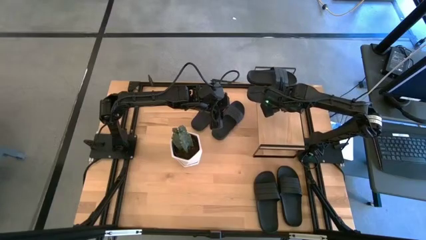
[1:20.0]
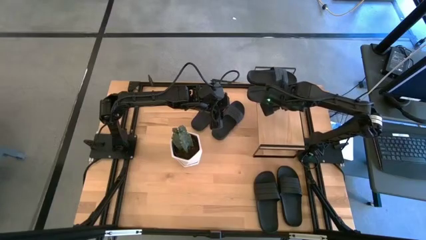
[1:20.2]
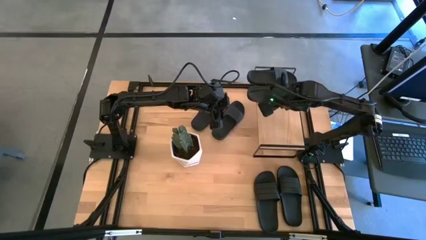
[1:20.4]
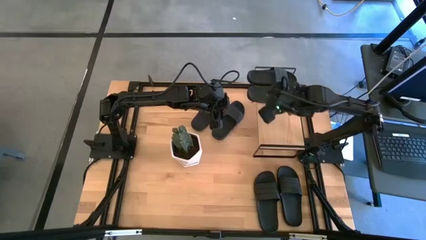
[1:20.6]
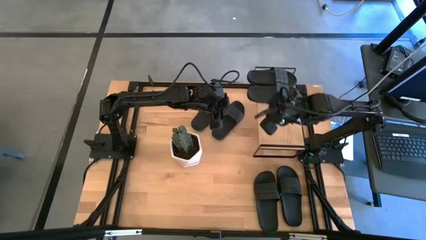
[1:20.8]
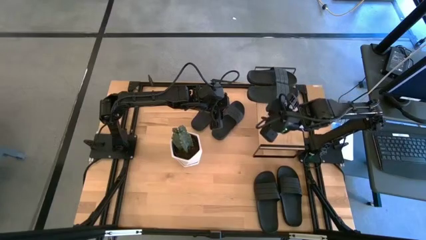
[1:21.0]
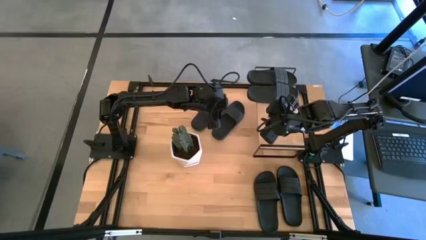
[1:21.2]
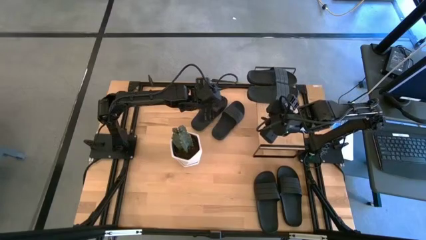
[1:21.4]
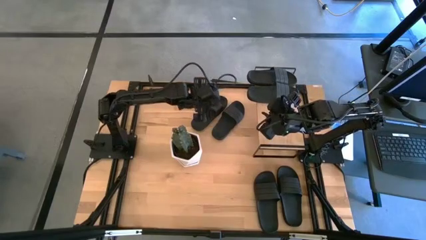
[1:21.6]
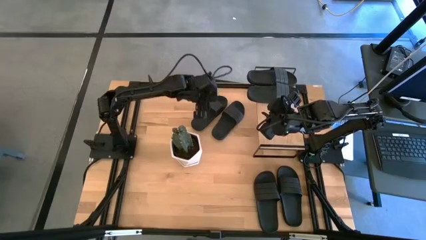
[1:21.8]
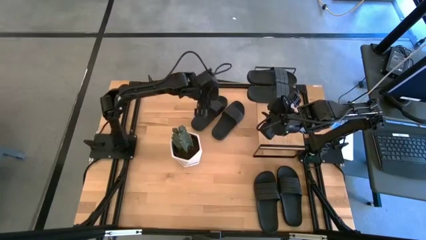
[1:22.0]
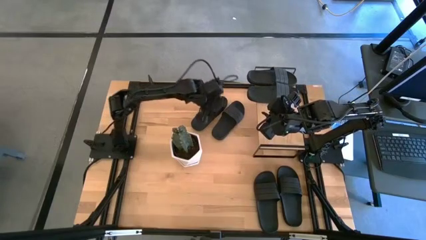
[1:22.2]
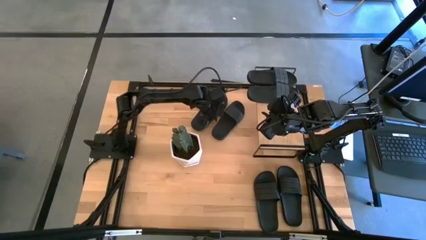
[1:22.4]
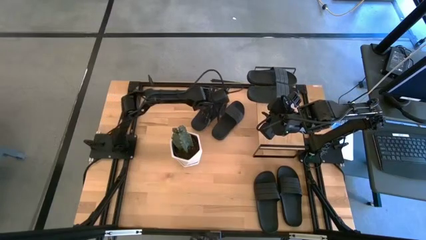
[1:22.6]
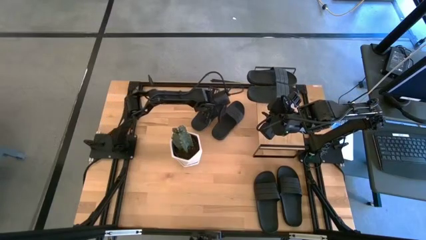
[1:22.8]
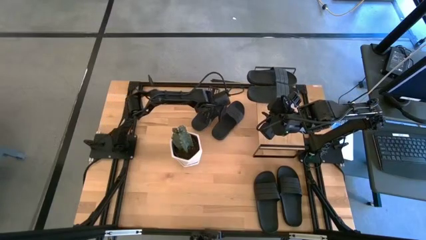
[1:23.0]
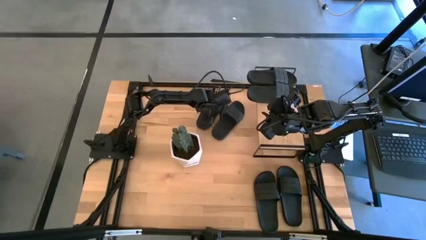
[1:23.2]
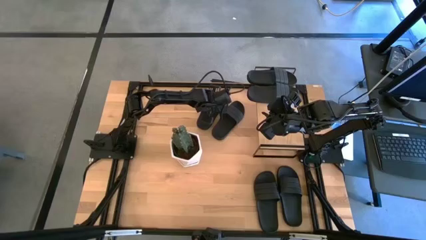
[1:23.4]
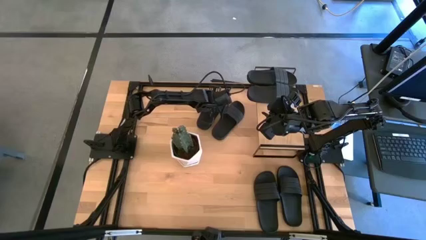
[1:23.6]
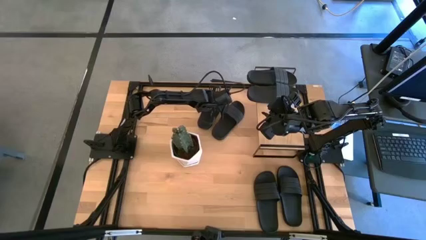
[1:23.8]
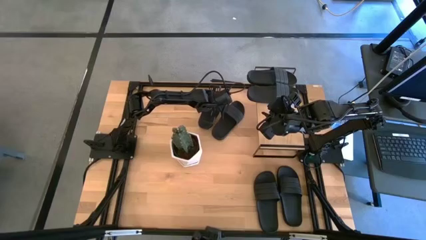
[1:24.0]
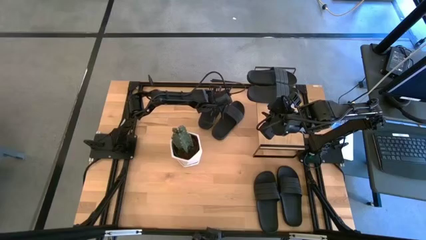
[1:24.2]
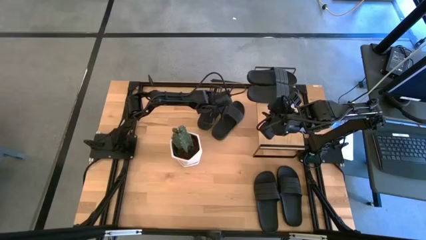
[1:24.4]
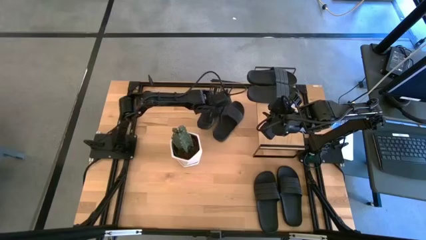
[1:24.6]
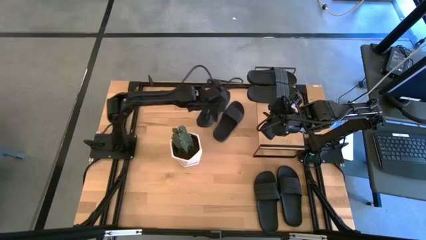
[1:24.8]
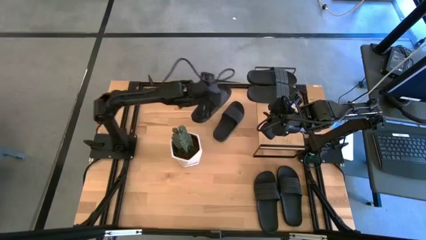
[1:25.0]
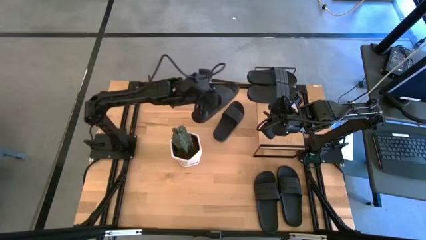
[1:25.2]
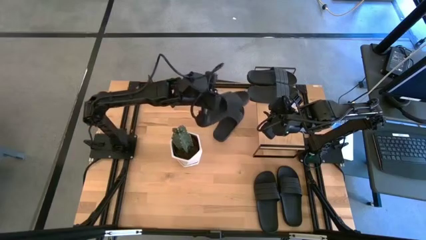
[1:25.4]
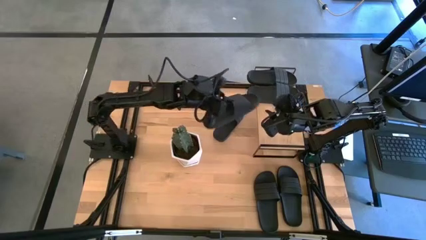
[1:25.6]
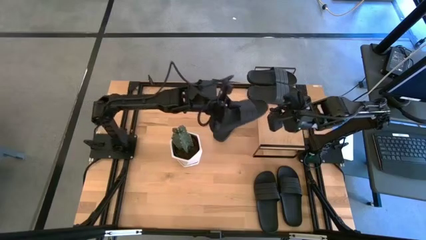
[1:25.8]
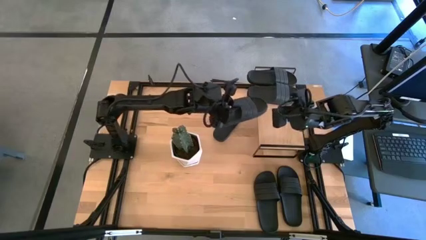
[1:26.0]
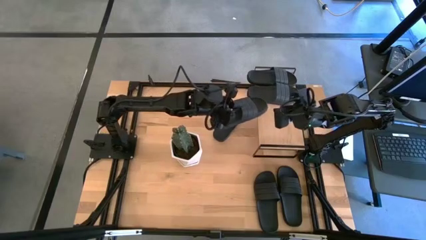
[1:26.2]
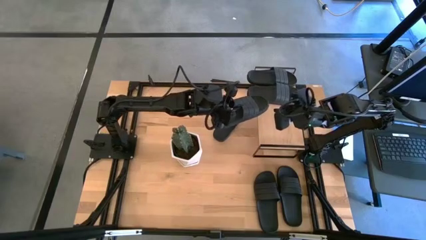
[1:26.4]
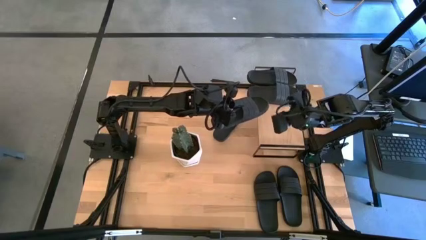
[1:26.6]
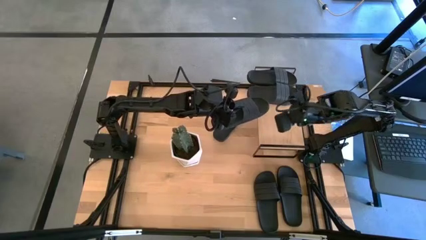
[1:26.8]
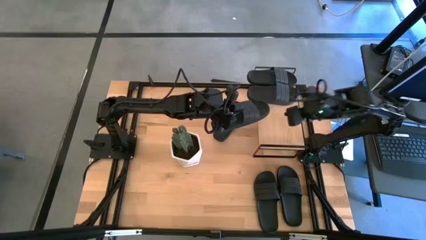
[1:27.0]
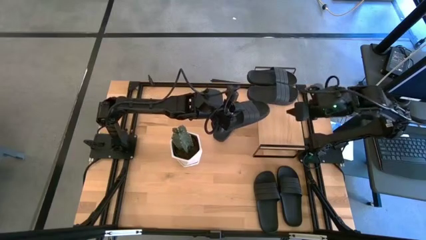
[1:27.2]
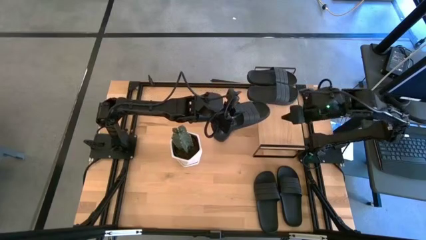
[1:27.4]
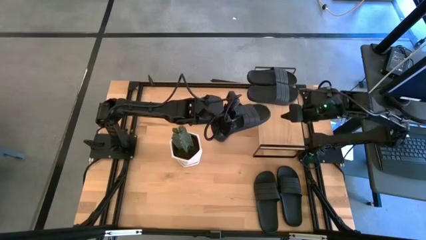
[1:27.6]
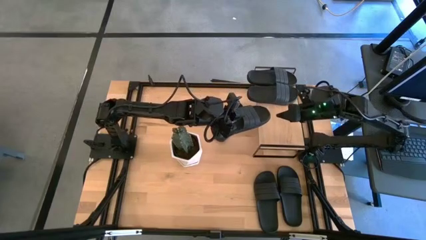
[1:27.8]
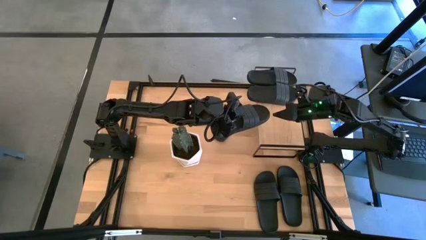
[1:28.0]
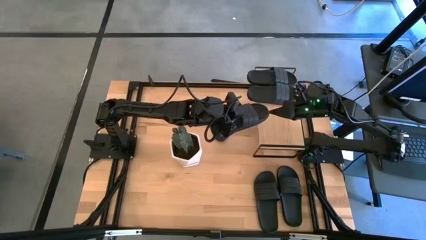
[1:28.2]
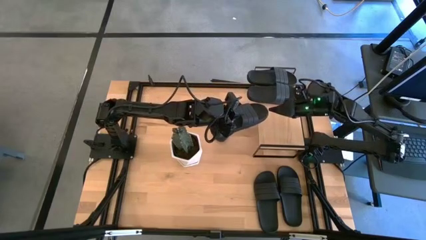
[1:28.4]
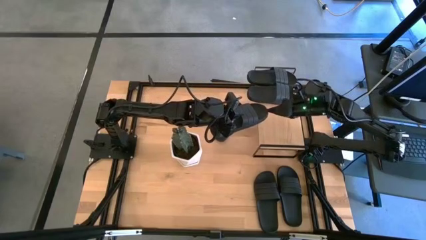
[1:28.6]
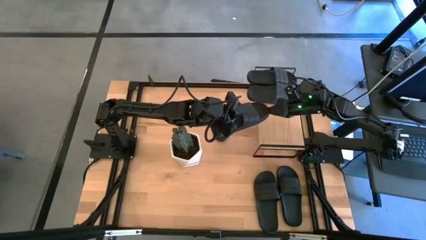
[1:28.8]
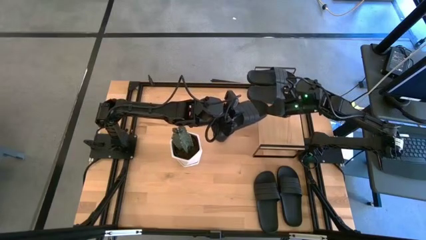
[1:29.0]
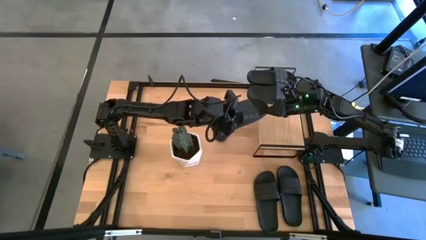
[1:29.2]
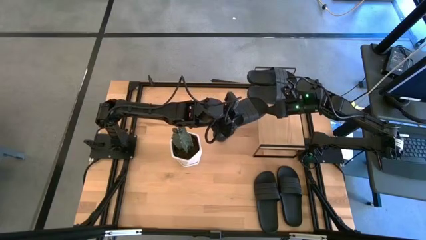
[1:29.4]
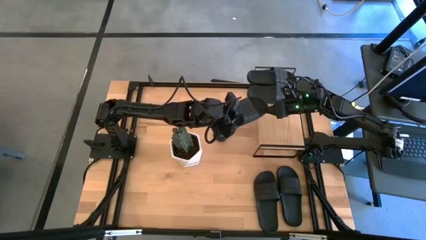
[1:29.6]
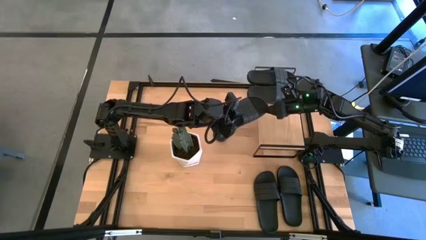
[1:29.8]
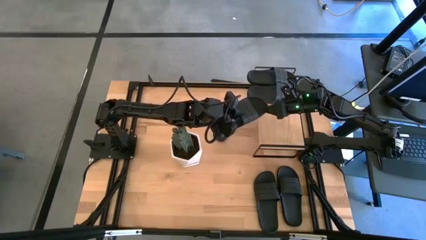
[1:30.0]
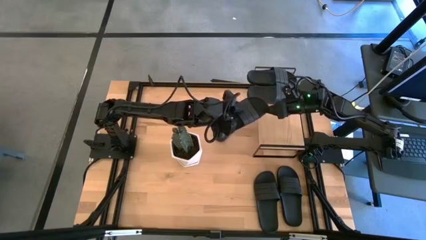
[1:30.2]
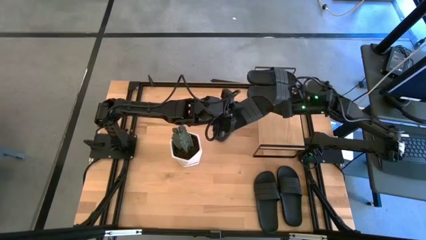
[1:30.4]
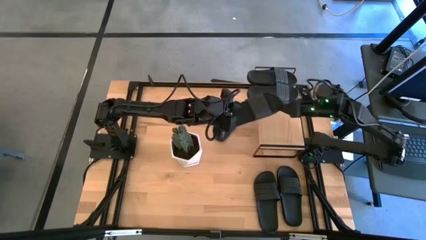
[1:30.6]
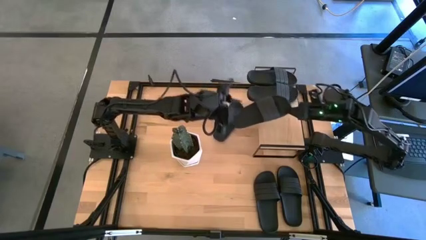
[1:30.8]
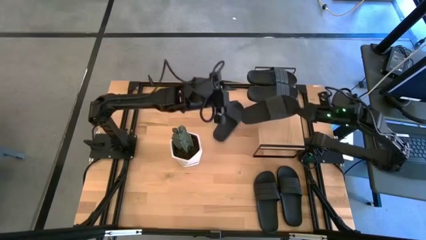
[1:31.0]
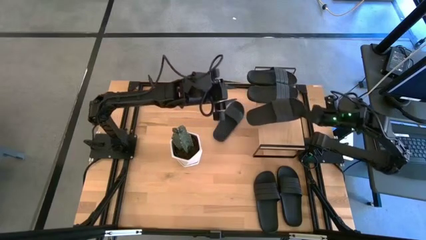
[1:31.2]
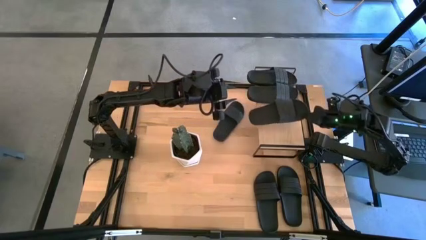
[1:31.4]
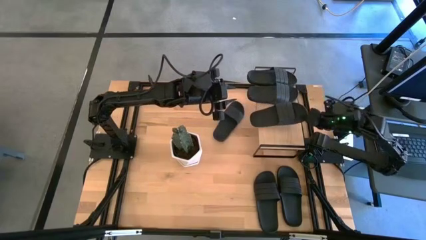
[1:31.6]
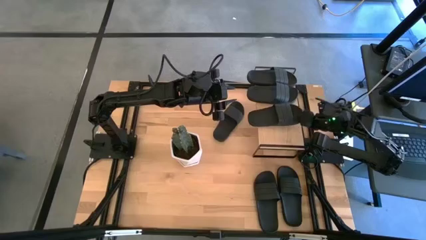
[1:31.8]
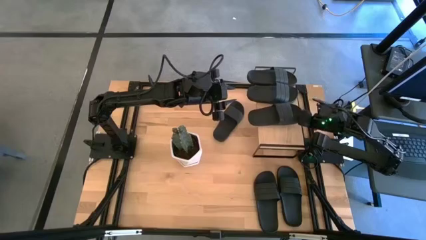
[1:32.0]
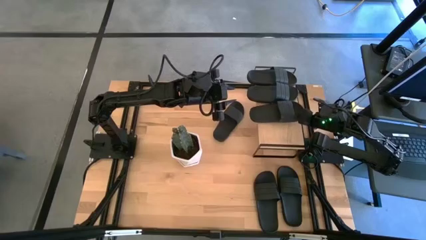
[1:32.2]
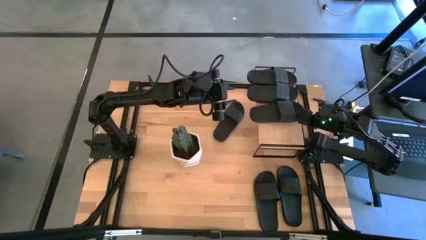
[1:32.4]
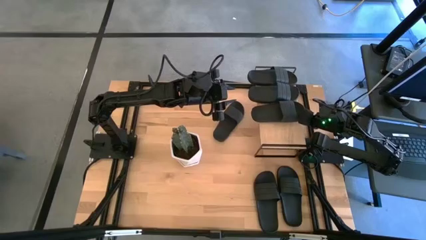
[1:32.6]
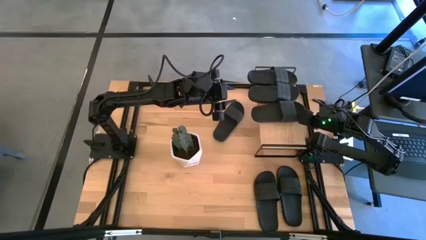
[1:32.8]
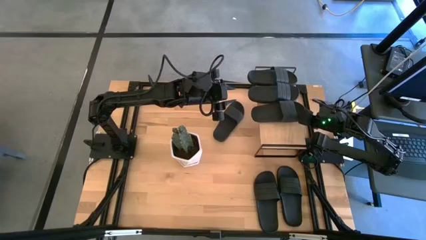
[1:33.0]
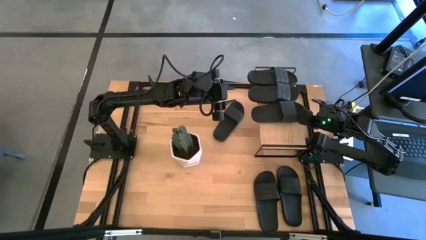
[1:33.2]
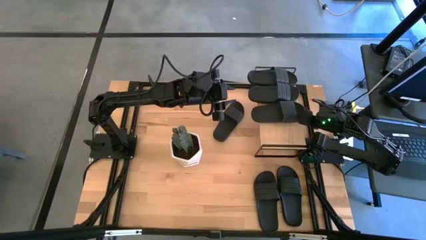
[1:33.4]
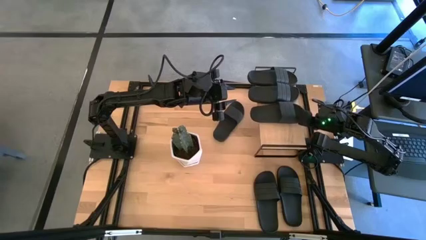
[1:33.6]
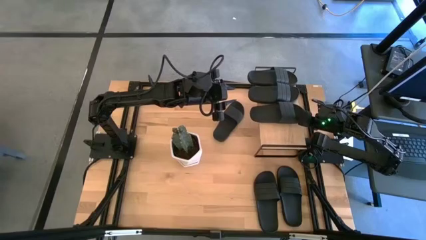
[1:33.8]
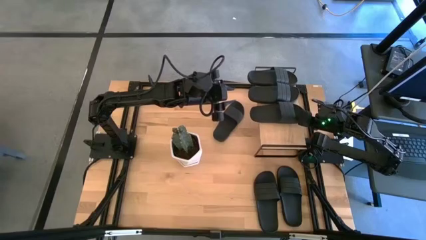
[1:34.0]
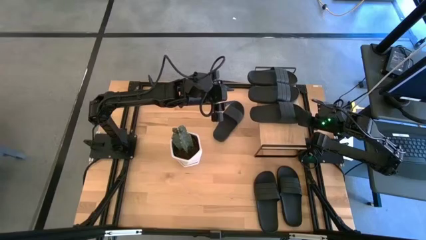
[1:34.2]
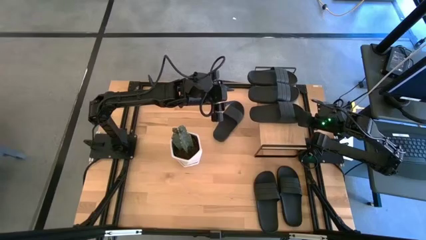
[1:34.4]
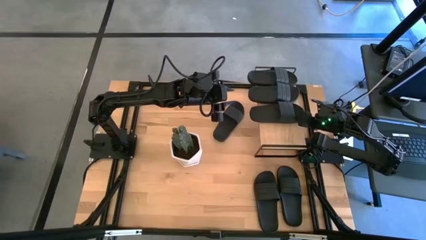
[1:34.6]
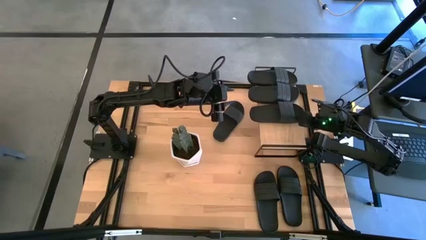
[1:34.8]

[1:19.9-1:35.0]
Task: Pick and place slides into the shelf
Put the black slide on the shelf
